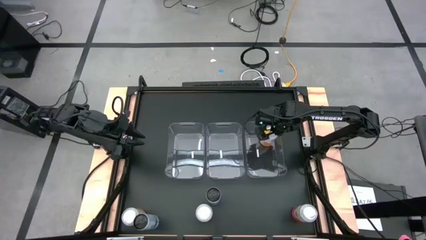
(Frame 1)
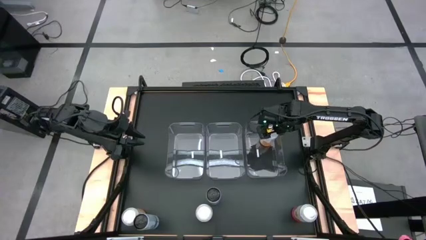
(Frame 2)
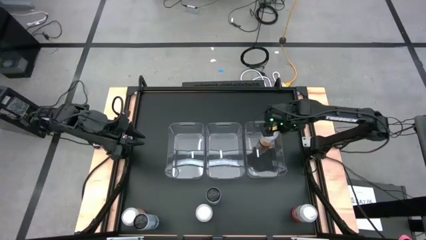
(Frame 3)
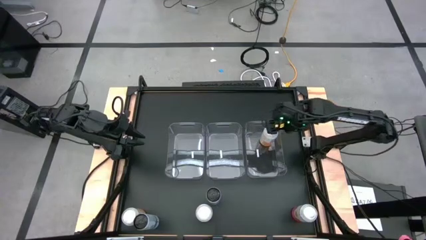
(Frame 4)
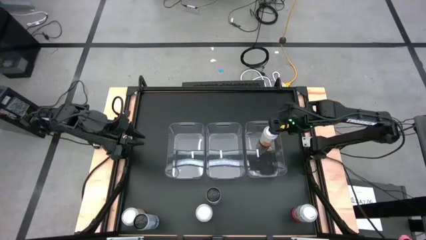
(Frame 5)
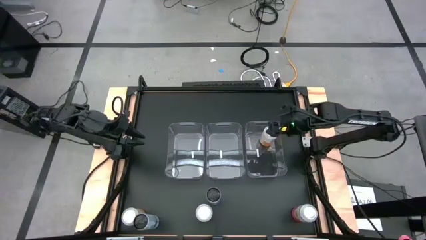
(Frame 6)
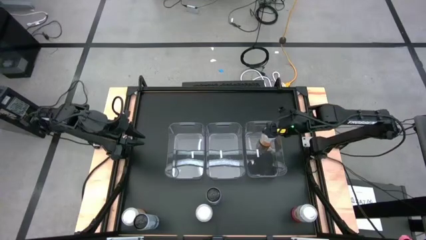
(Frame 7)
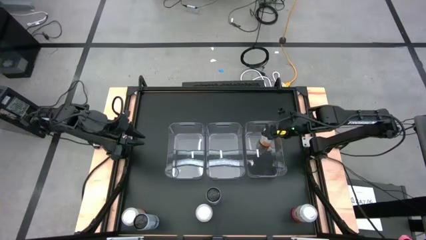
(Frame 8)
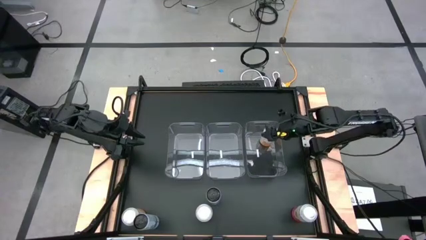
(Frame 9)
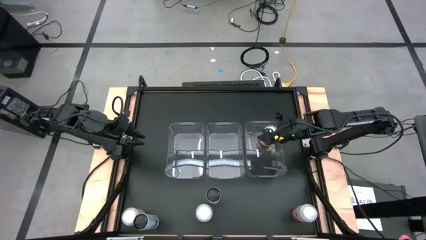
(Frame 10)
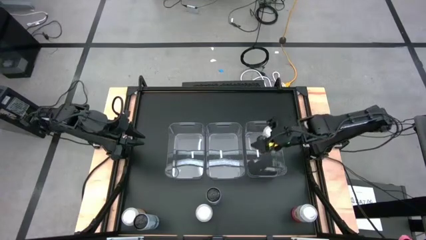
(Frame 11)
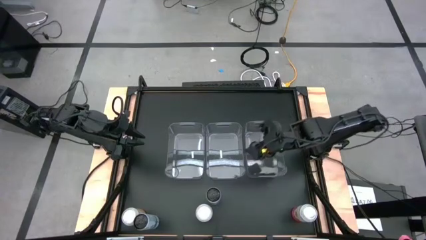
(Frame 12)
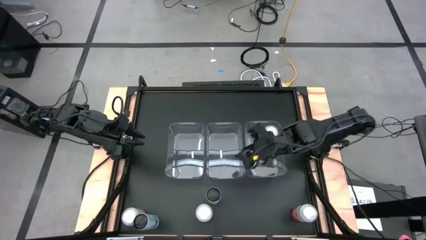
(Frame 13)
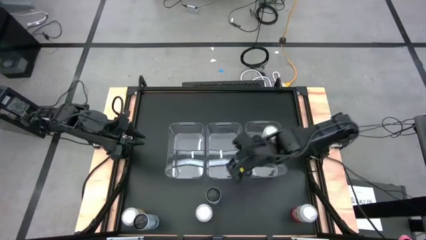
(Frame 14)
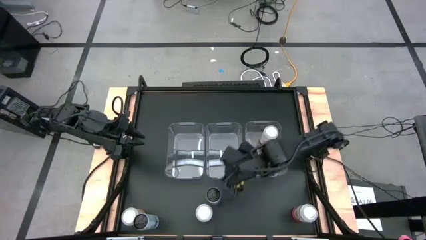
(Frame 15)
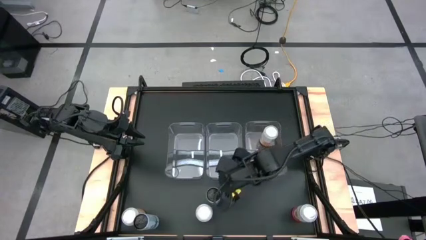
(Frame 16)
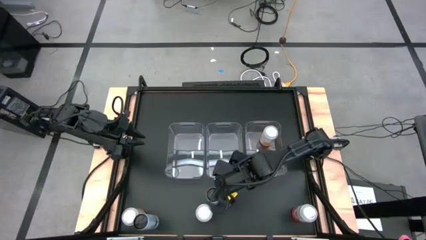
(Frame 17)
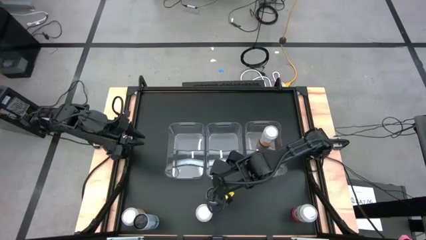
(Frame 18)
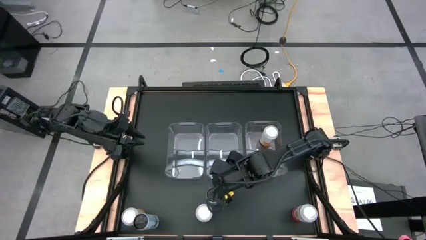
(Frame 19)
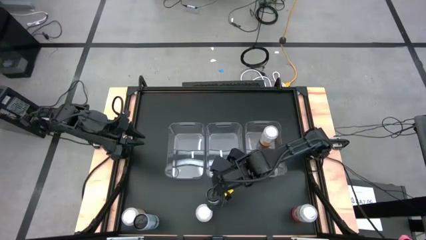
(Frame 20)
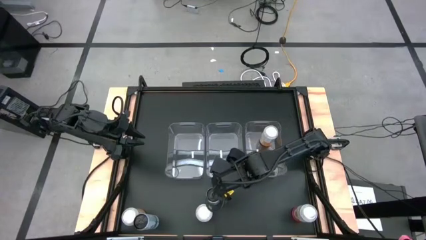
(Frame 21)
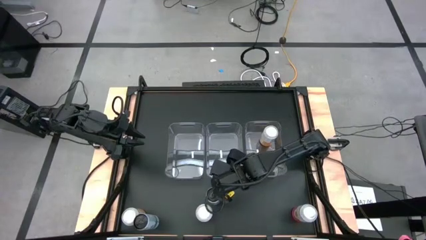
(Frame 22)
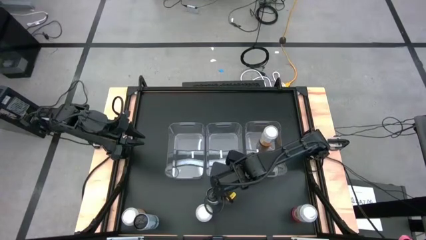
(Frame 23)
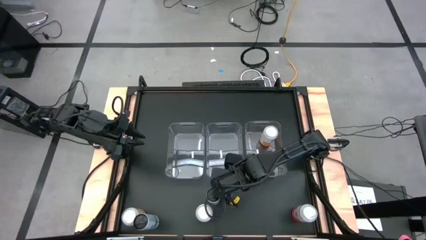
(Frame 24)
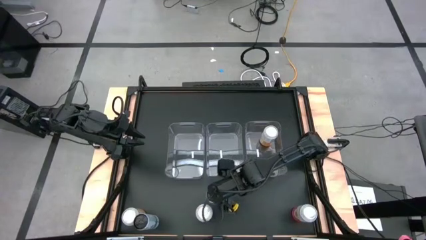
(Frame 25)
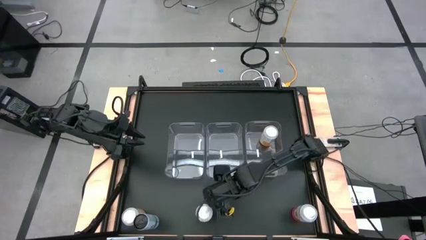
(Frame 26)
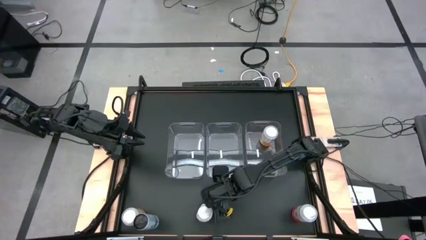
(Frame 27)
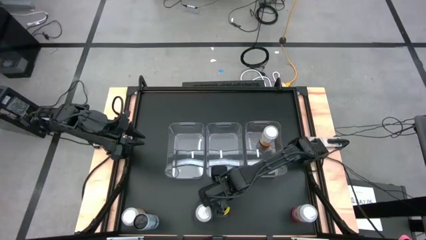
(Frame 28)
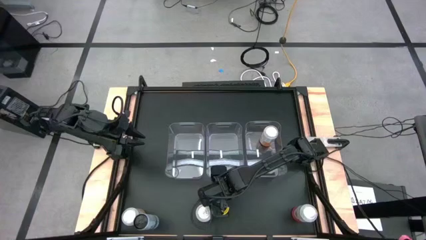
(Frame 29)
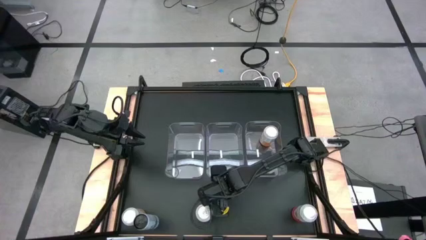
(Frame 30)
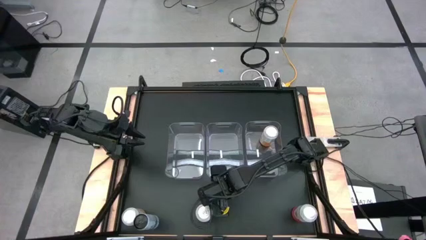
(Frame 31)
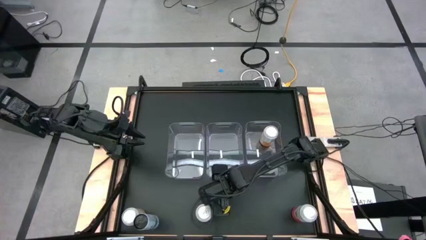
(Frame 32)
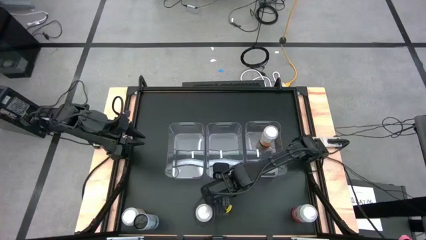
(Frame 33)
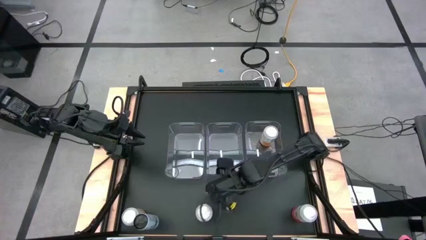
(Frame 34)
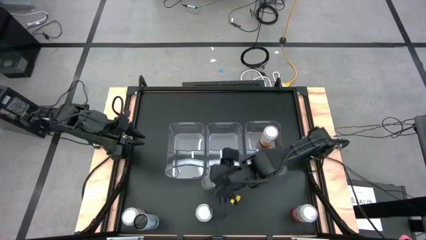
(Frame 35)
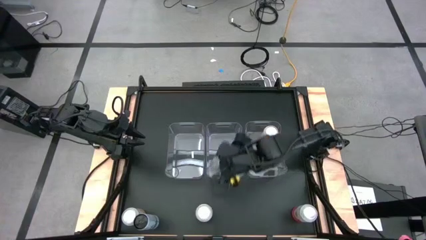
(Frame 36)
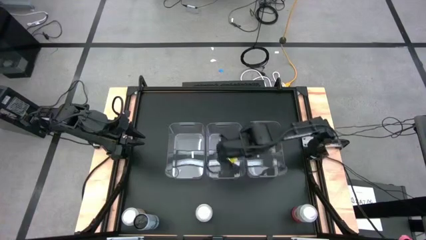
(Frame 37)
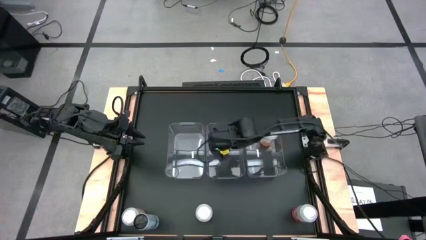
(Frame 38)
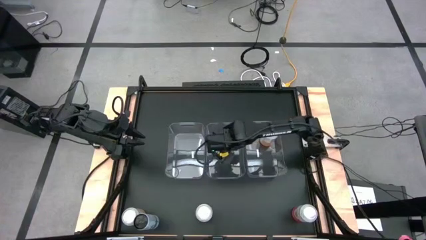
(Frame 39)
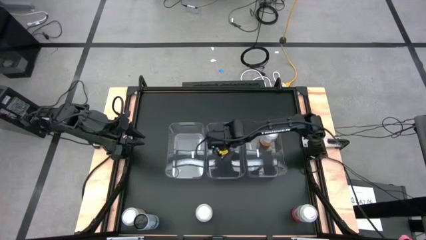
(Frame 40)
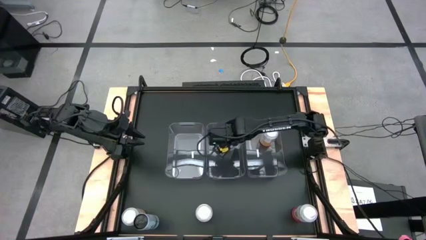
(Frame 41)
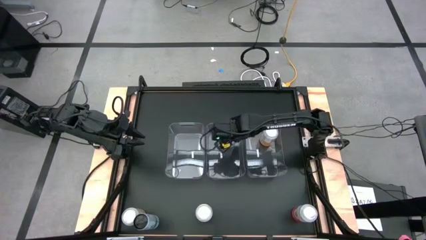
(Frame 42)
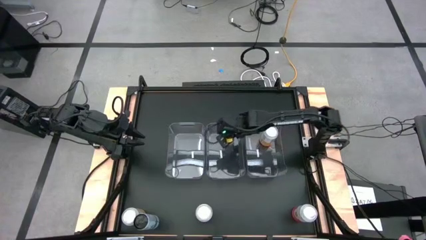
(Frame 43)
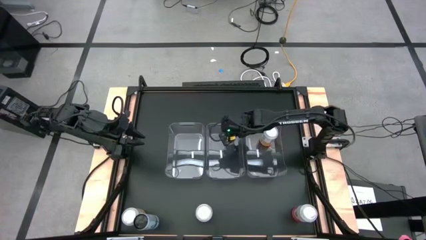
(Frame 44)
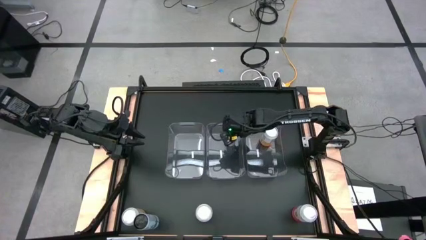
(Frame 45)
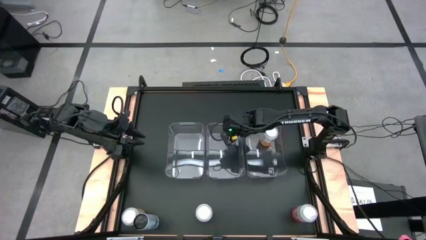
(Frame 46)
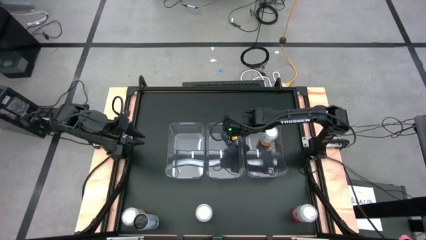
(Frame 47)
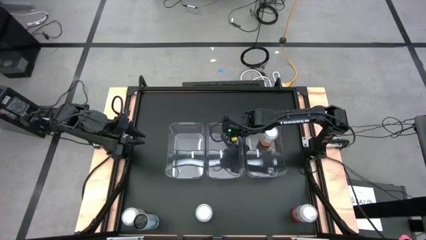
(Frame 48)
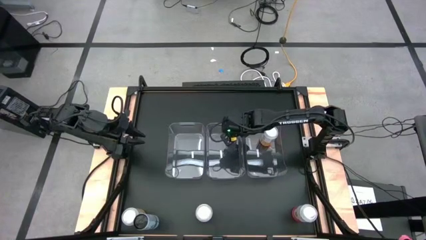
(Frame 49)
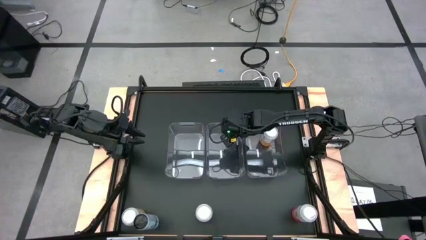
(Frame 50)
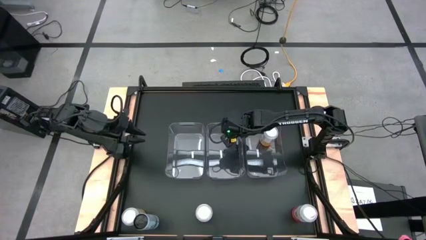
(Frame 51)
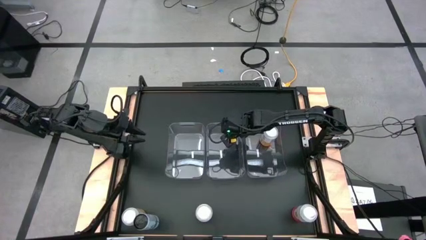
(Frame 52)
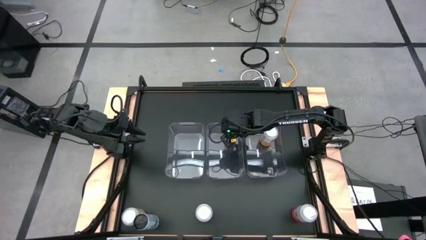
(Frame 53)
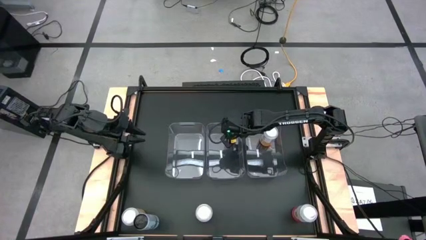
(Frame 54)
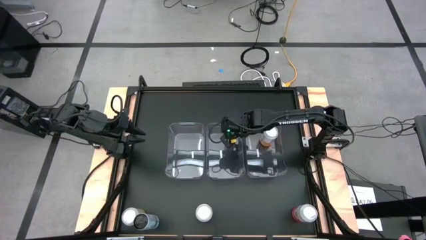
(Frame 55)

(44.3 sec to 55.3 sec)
Task: Sort soda cans
Put the top white-blue soda can into the center transparent bin

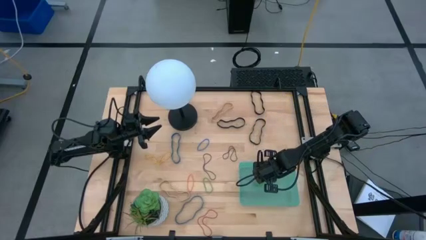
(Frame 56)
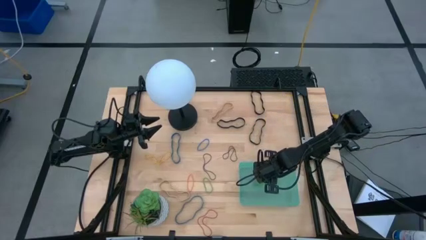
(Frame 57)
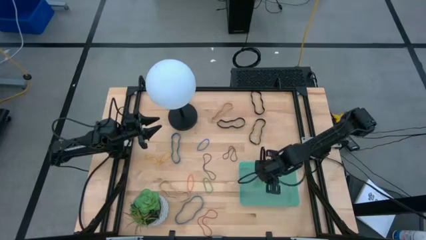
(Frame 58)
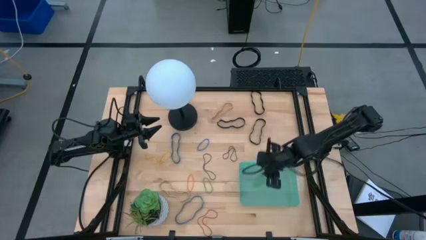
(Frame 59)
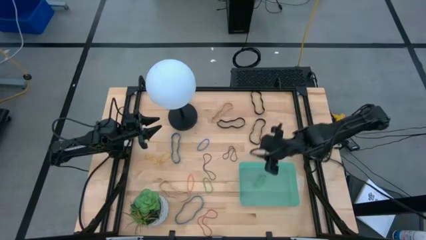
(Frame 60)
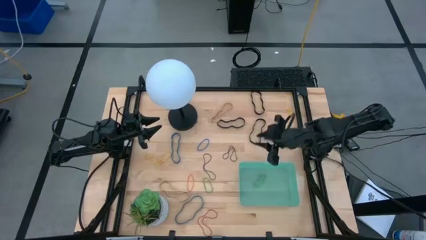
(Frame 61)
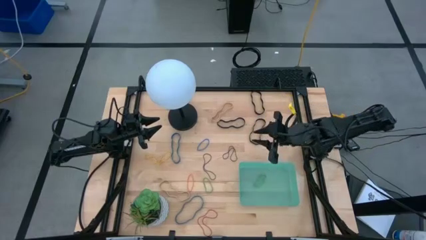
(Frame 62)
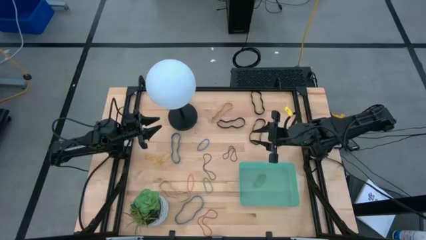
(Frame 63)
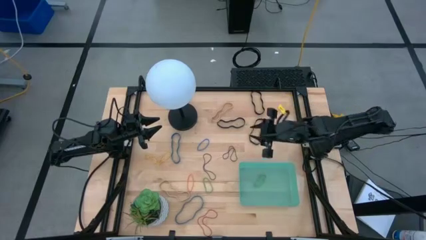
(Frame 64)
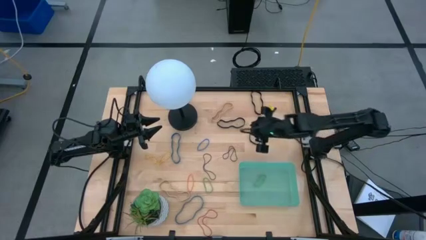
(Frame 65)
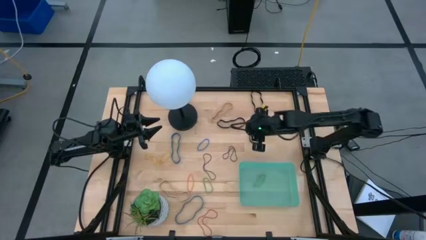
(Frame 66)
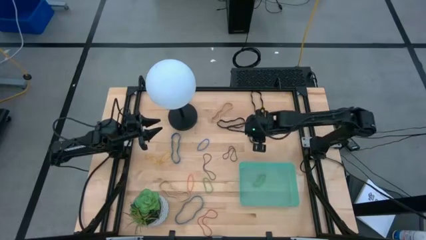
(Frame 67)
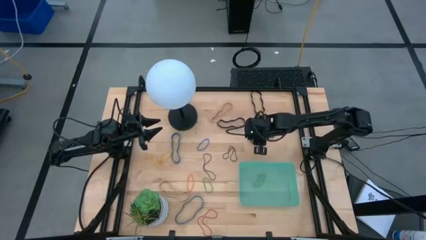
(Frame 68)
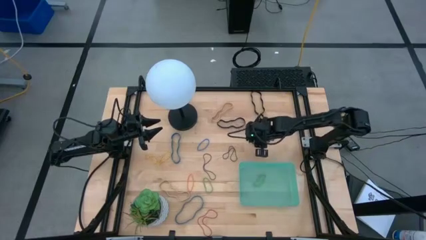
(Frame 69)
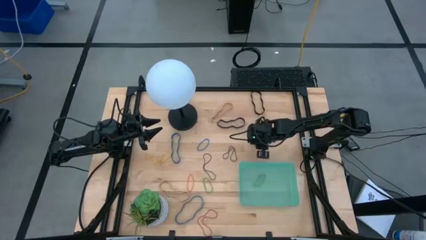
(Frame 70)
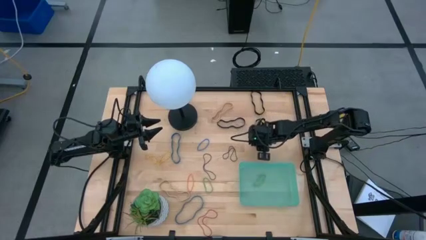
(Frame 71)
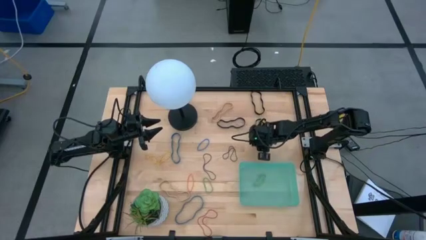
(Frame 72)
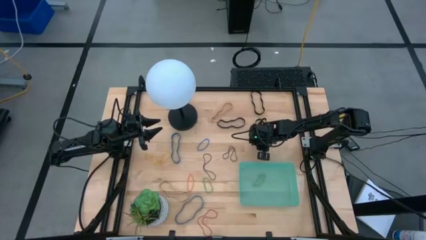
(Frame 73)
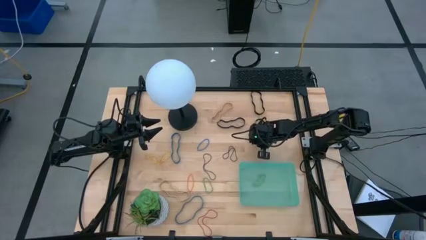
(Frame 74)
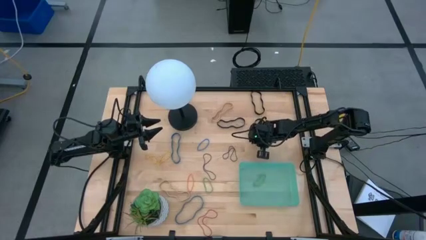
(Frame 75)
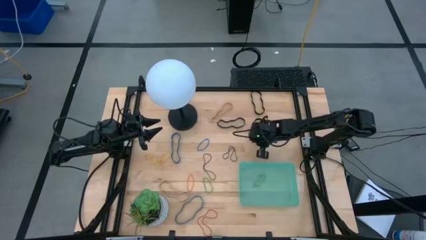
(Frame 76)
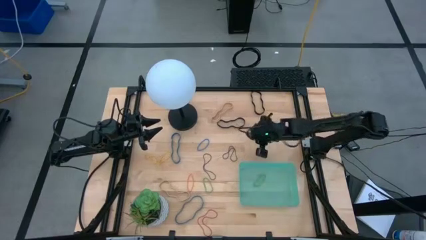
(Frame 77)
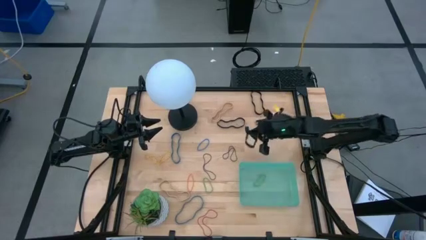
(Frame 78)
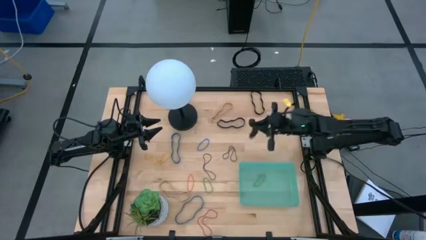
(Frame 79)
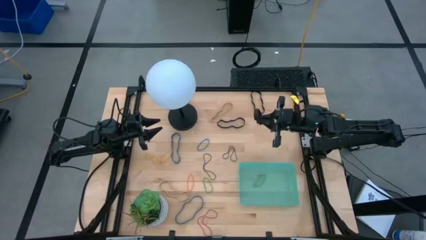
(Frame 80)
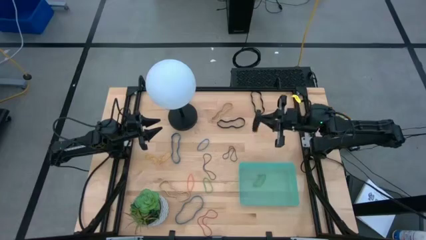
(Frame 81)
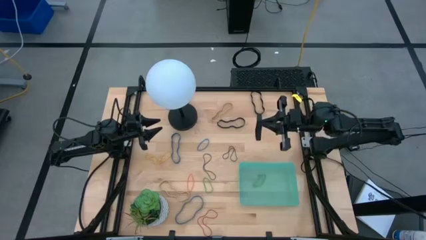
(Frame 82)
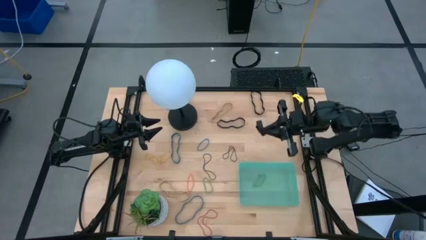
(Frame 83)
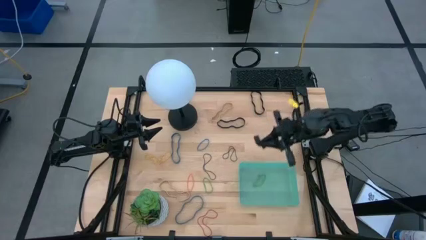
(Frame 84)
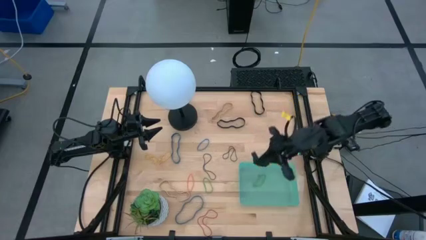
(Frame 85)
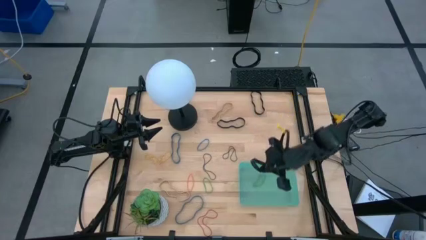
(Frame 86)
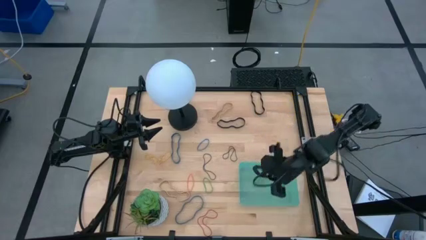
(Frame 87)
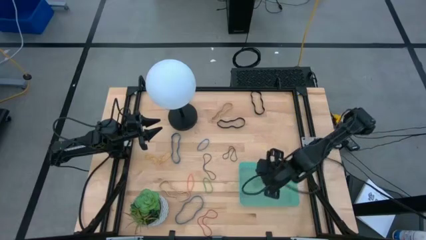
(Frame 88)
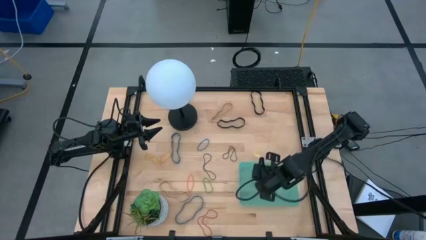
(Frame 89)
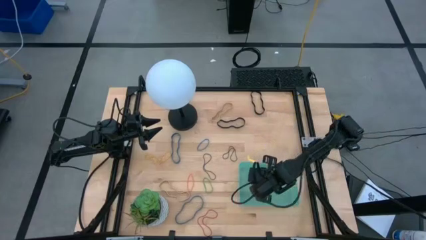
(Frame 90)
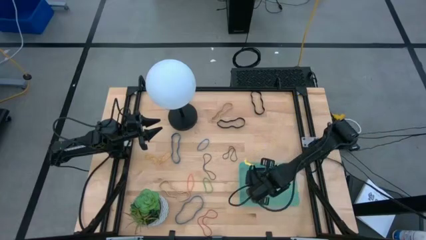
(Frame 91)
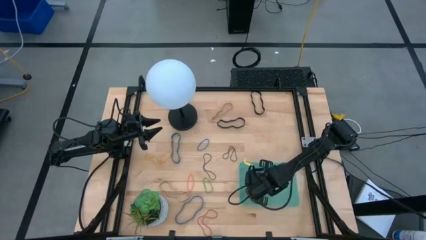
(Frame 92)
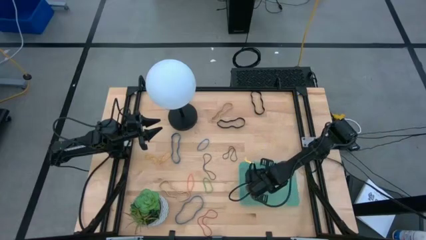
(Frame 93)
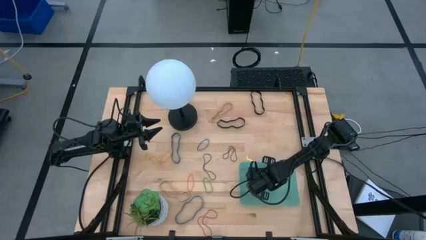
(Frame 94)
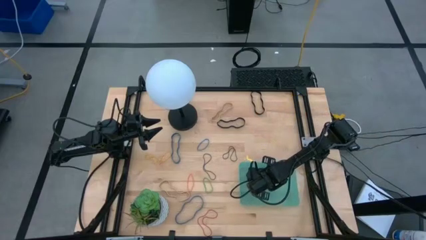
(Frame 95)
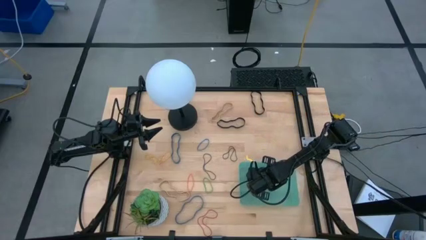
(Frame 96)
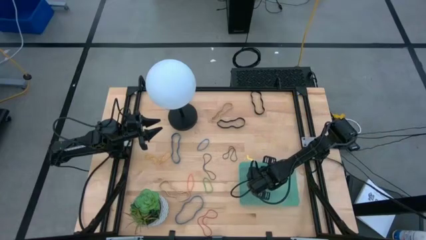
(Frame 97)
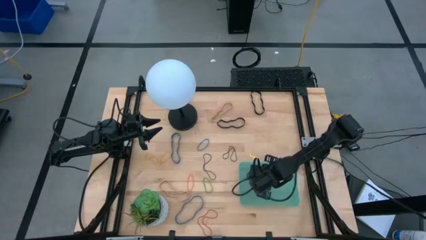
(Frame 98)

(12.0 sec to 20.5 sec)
Task: Pick and place rubber bands into bin
Put the bottom right black rubber band into the green bin
